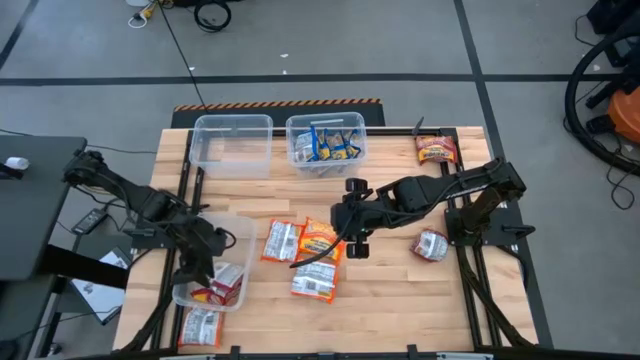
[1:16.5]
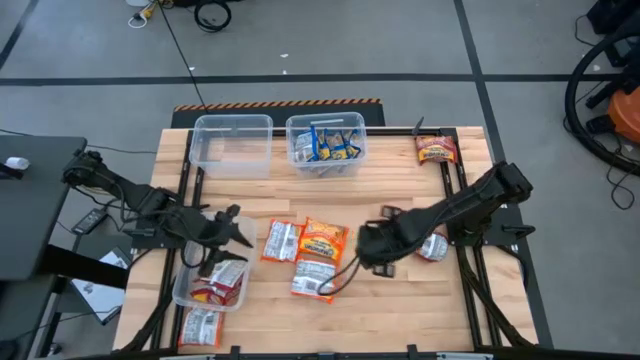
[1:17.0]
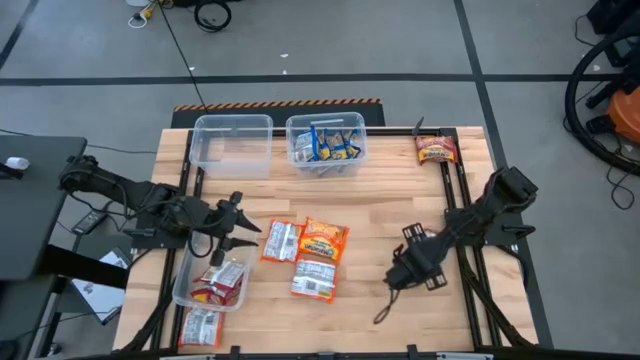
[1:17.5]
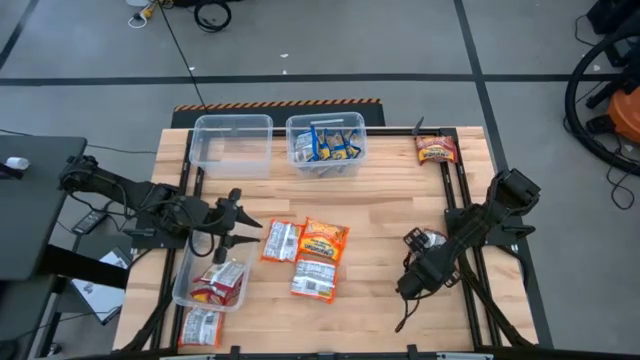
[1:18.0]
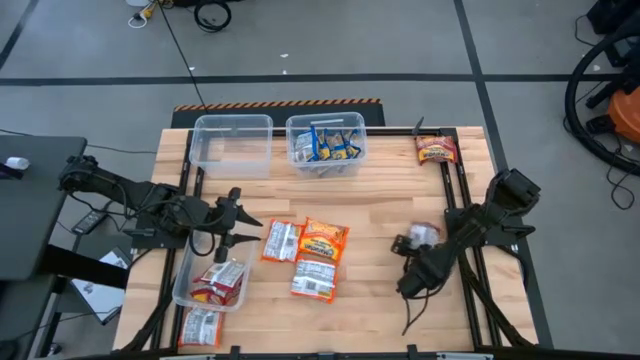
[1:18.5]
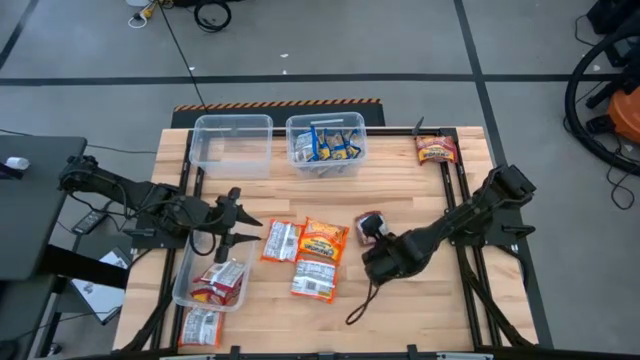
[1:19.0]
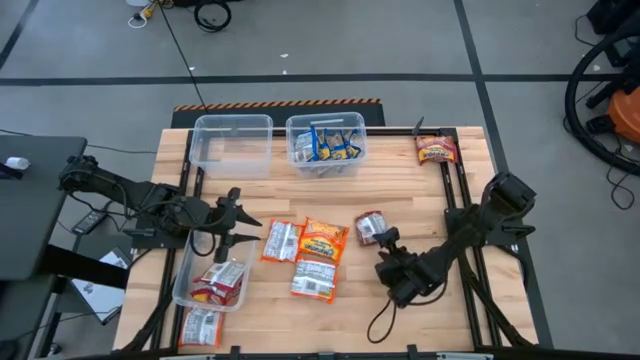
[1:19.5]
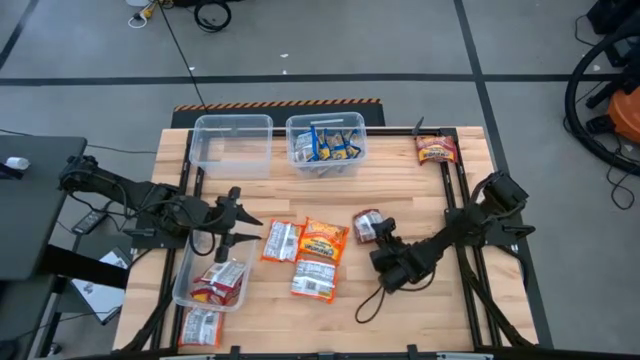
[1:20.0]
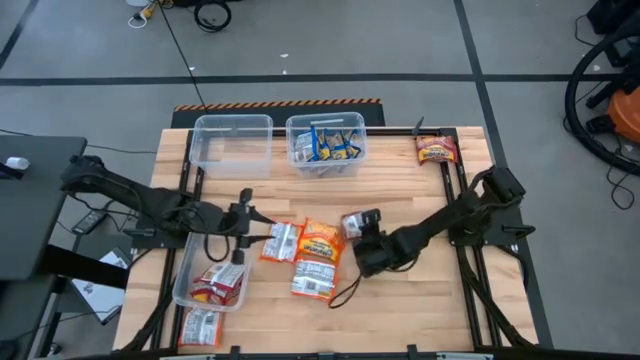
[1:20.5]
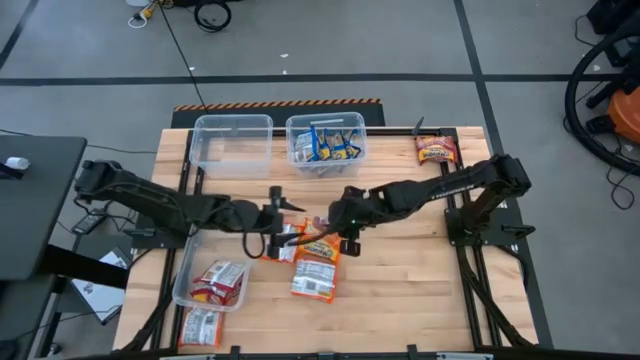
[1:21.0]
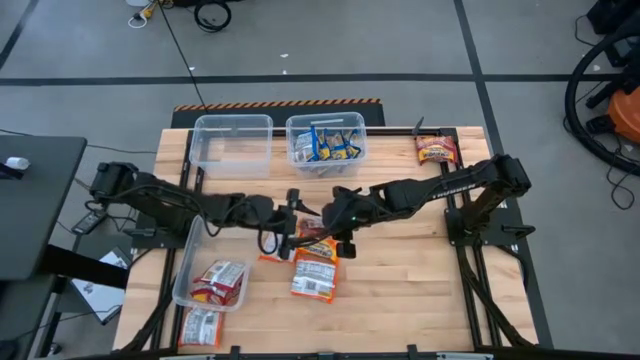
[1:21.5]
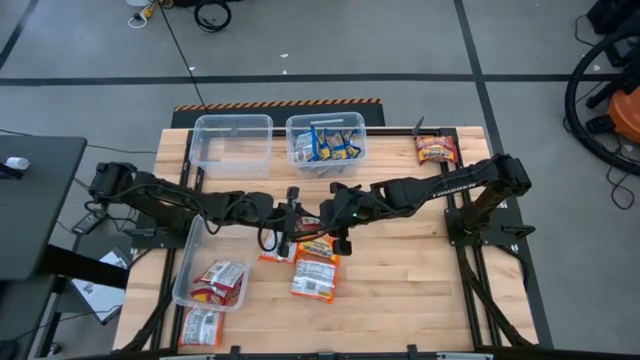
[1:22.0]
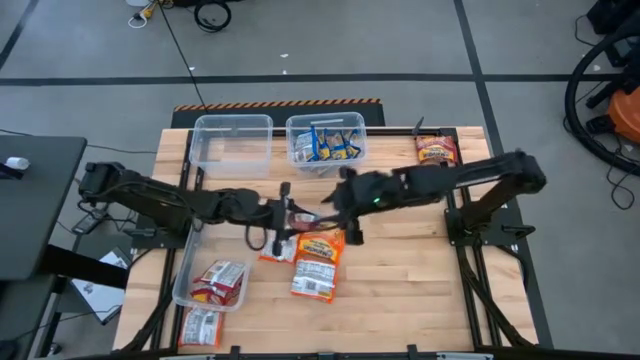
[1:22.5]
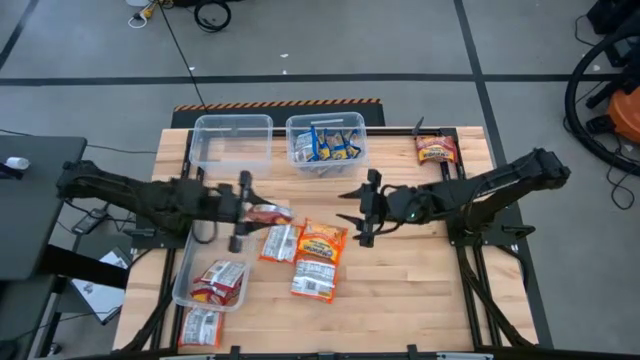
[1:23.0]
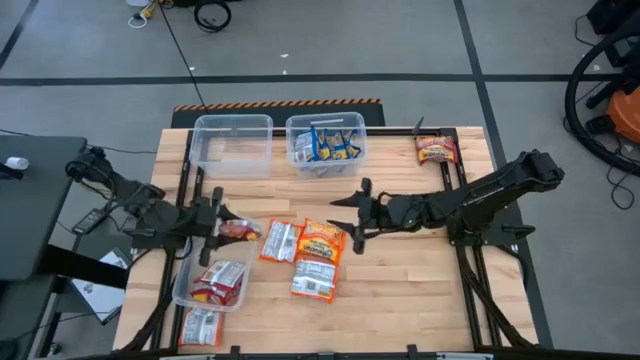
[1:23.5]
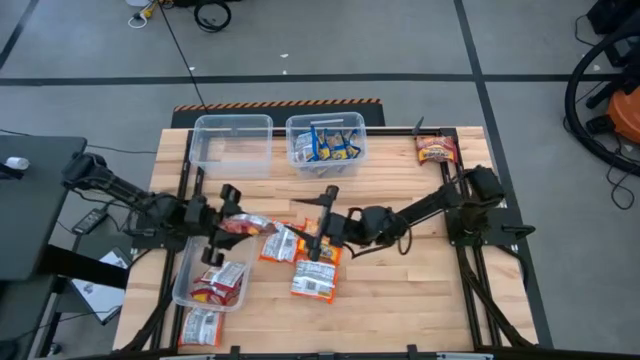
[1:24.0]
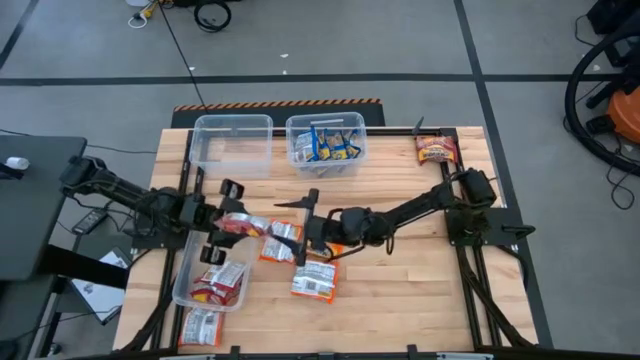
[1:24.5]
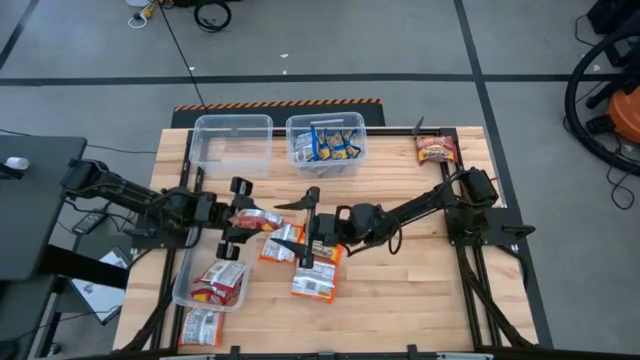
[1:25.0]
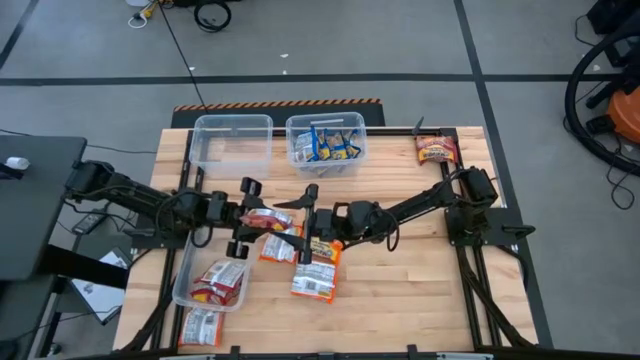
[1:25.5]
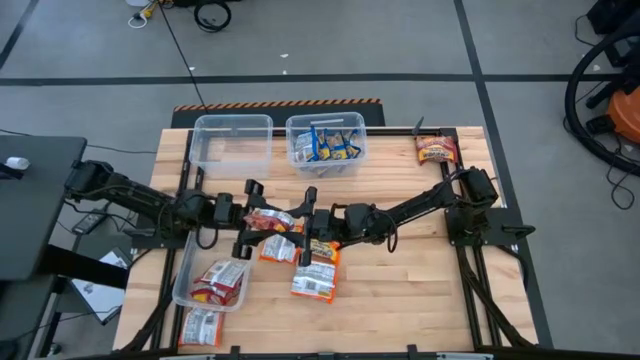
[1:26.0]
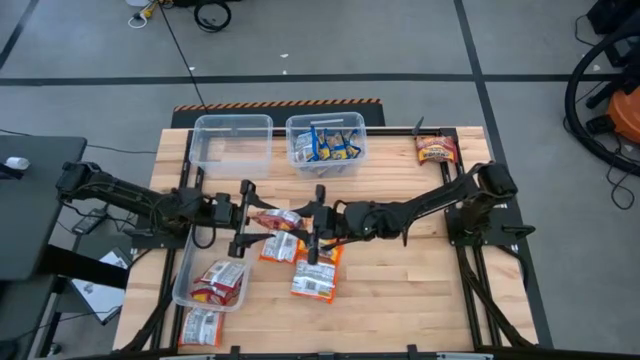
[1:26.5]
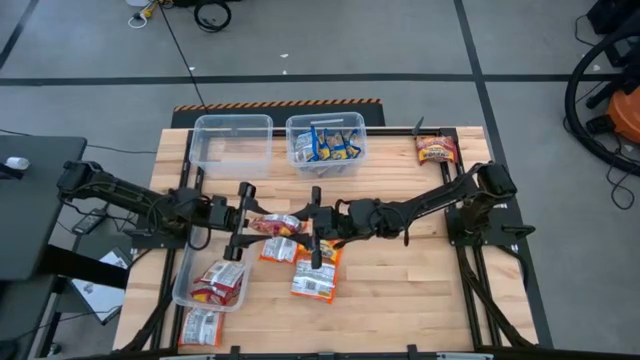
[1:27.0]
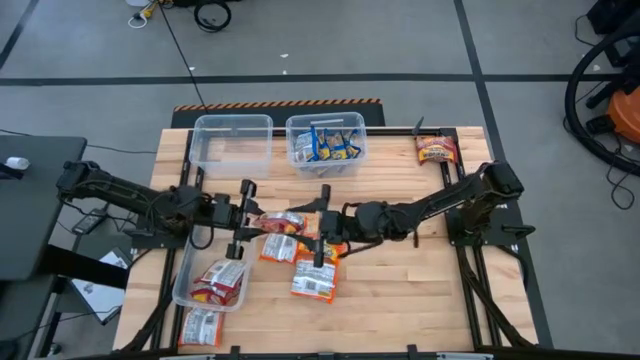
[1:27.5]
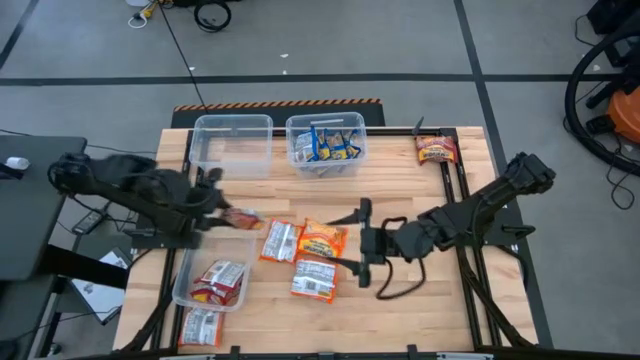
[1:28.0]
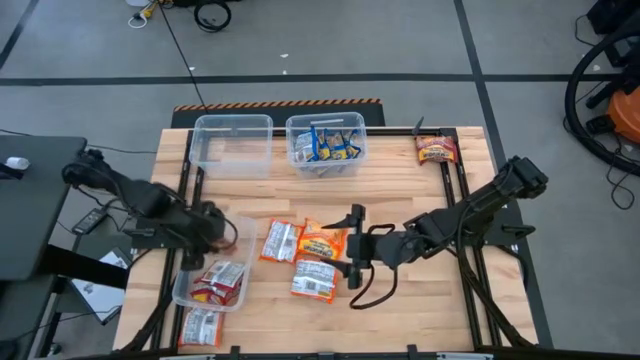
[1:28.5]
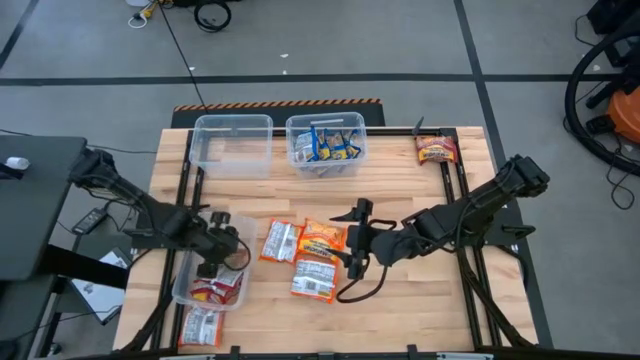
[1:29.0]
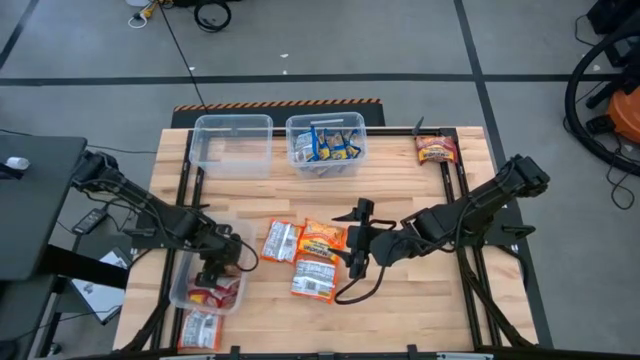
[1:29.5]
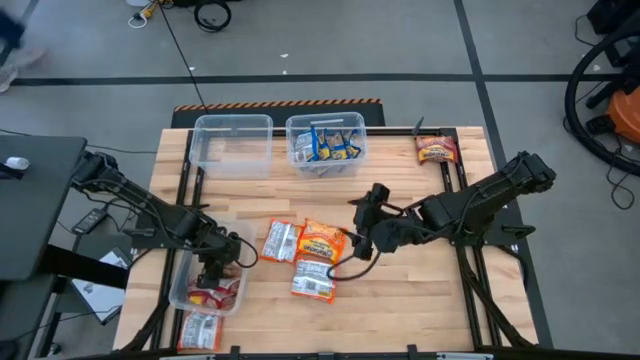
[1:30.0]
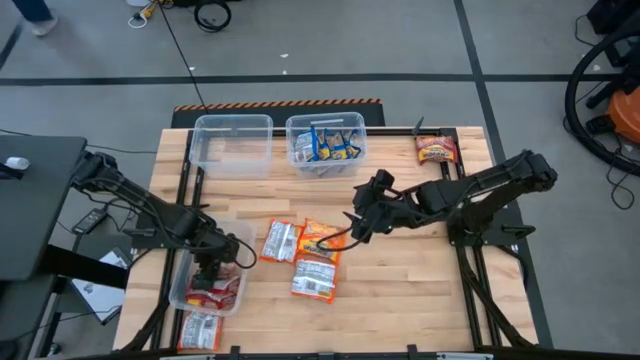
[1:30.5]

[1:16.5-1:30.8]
Task: Sort Maruchan noodles
Put the bottom red noodle pack into the bottom left transparent bin

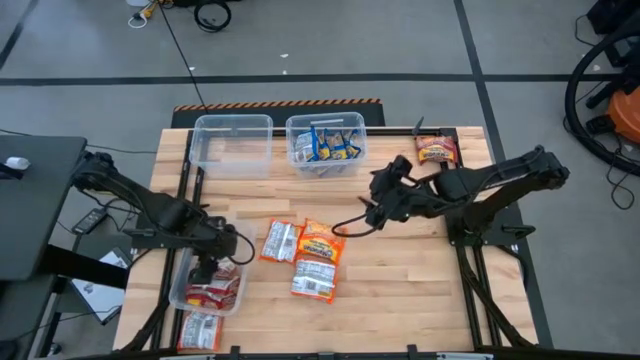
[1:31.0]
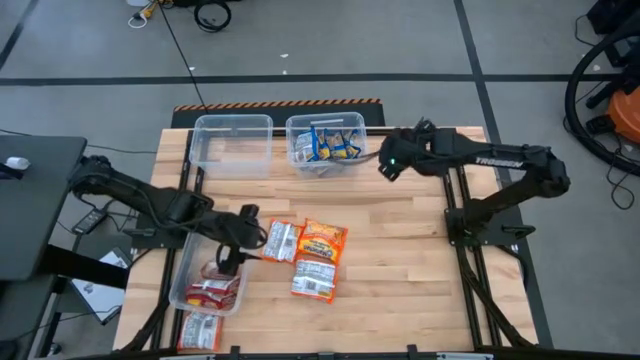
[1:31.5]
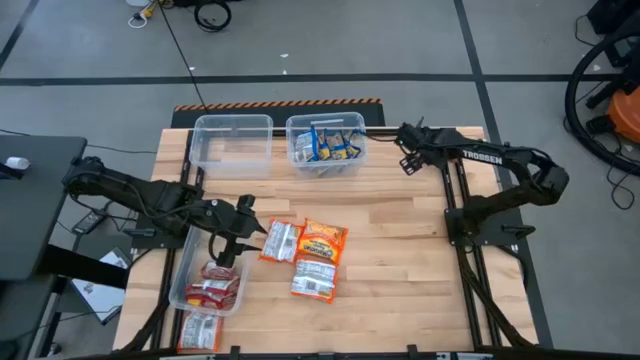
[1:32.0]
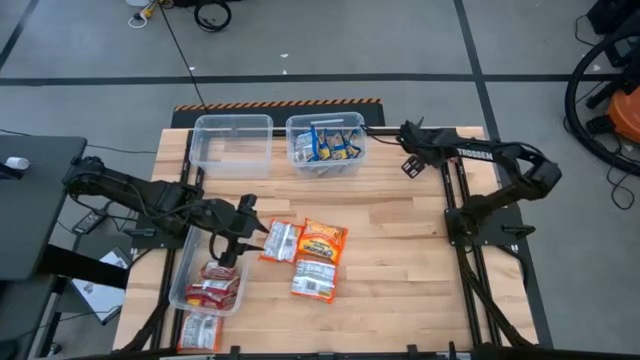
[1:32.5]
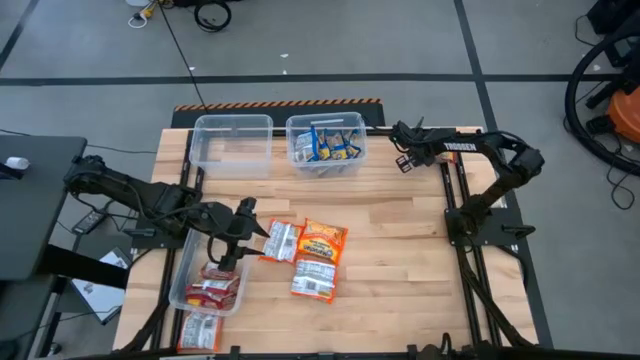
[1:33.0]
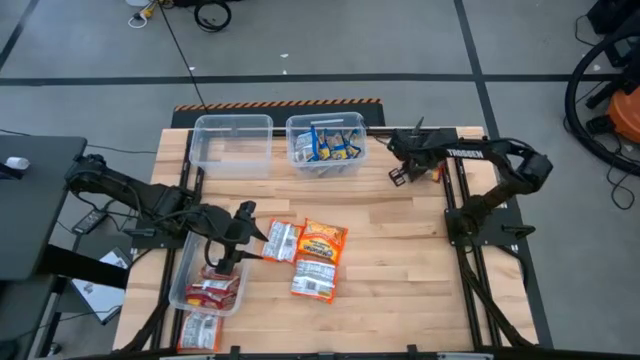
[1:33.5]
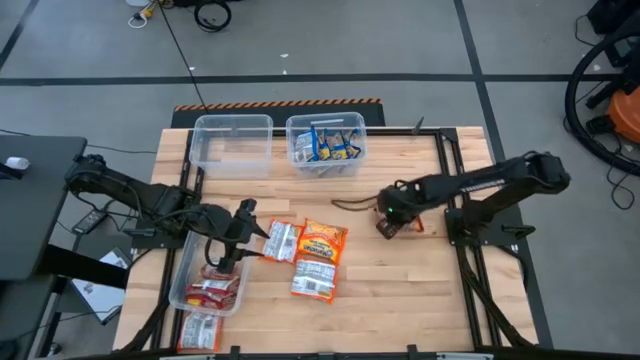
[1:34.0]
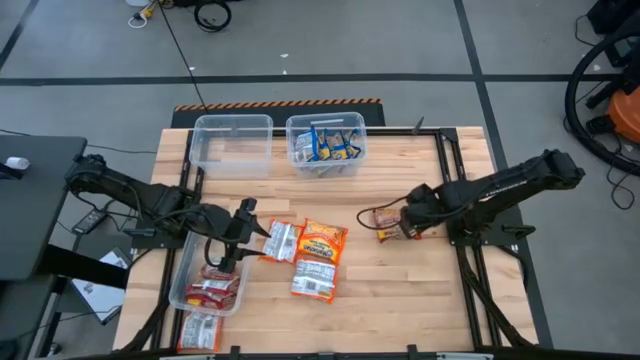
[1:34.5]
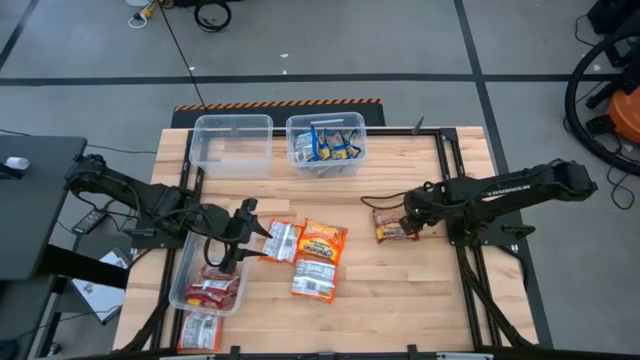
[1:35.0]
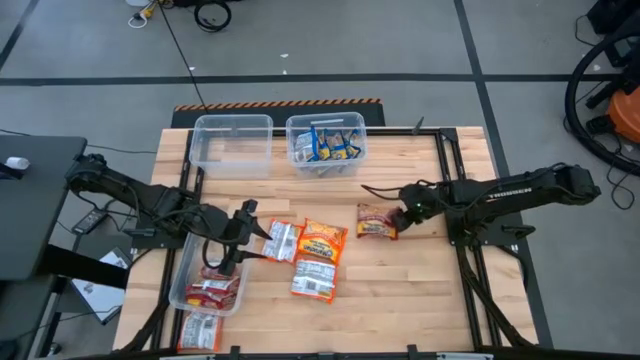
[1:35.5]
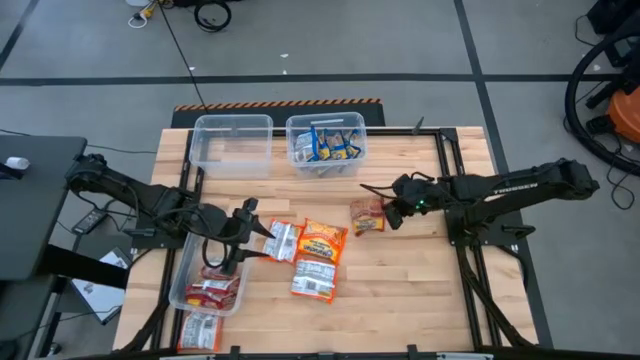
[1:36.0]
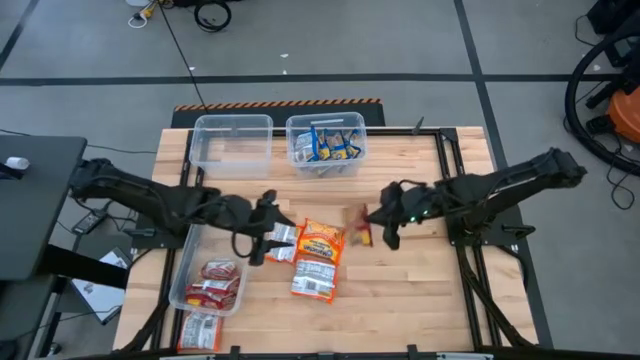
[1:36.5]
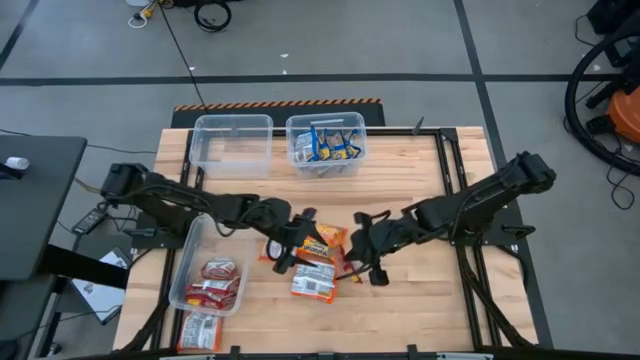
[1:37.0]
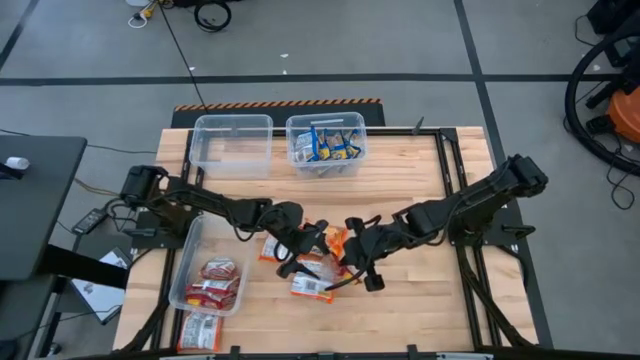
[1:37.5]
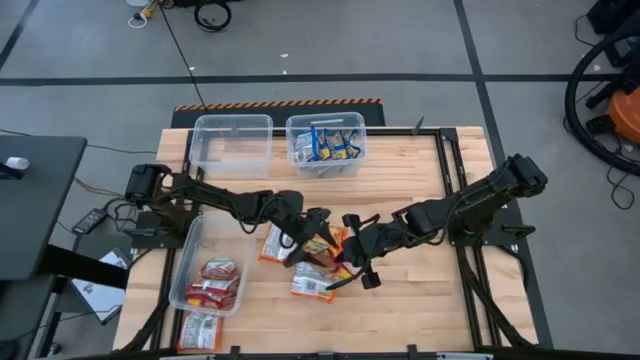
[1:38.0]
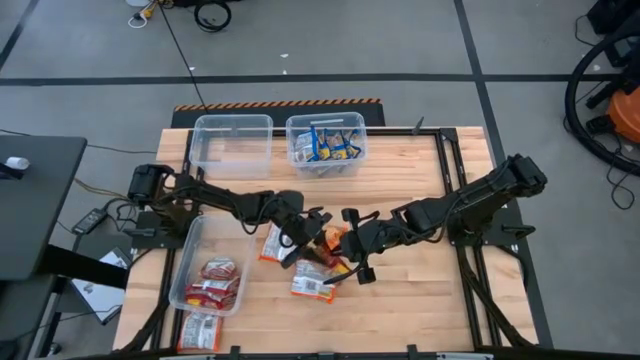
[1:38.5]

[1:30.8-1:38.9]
Put the red noodle pack into the bottom left transparent bin
